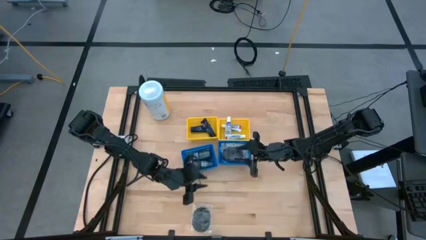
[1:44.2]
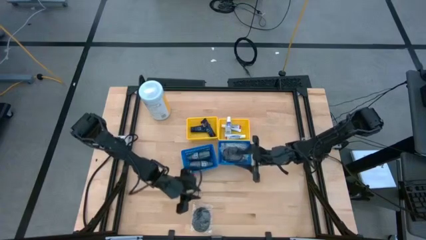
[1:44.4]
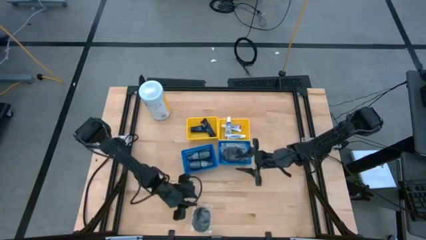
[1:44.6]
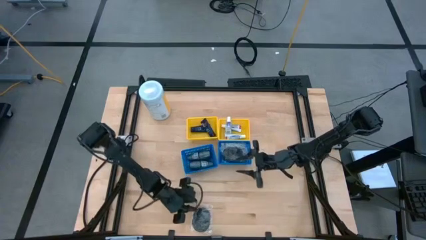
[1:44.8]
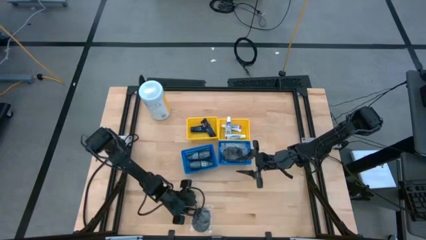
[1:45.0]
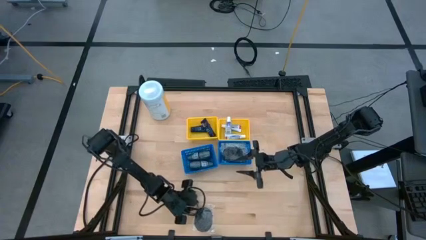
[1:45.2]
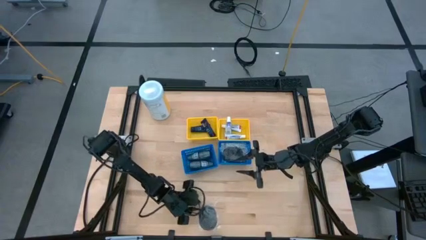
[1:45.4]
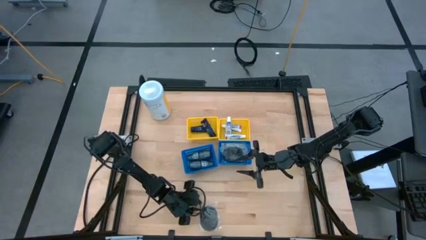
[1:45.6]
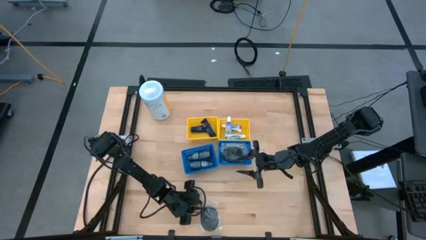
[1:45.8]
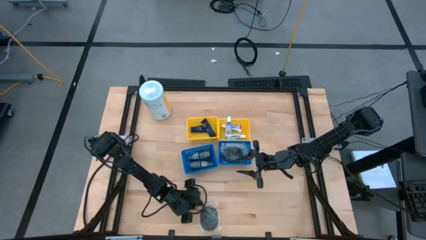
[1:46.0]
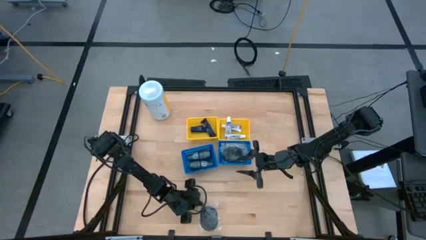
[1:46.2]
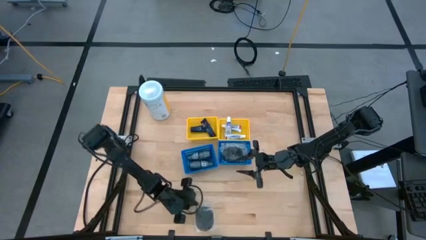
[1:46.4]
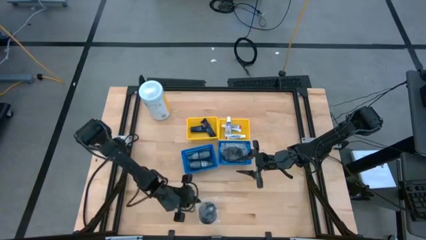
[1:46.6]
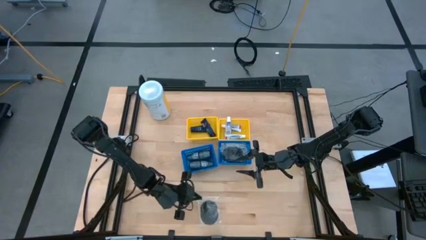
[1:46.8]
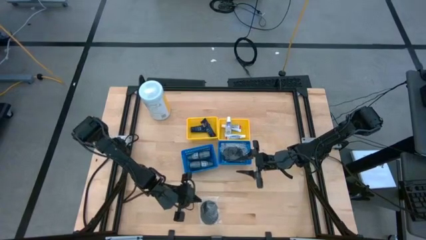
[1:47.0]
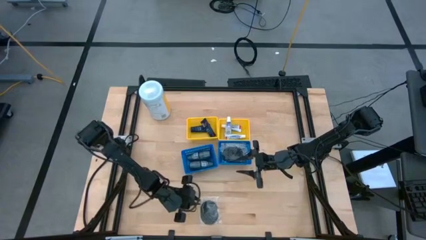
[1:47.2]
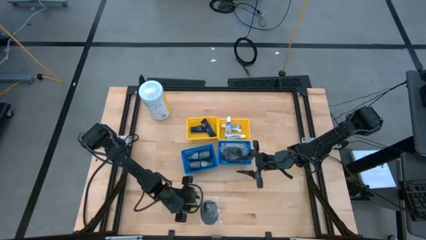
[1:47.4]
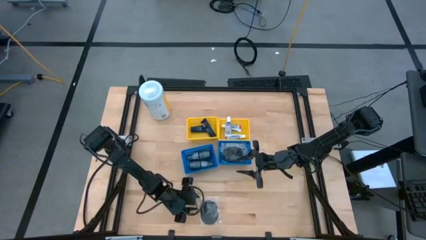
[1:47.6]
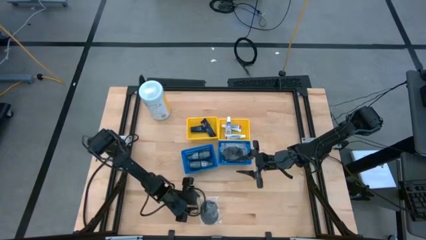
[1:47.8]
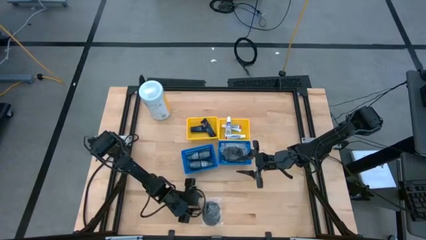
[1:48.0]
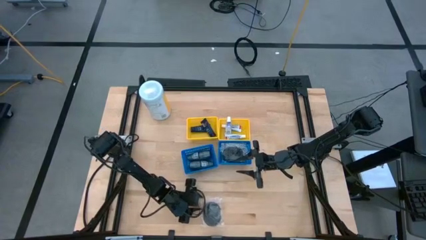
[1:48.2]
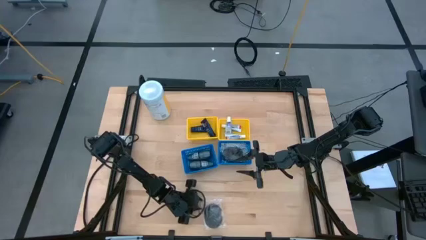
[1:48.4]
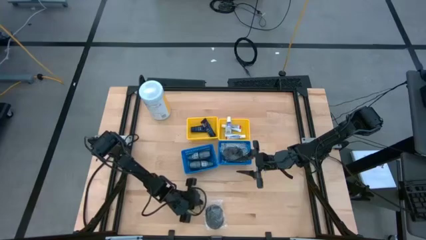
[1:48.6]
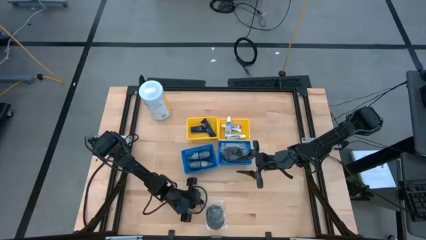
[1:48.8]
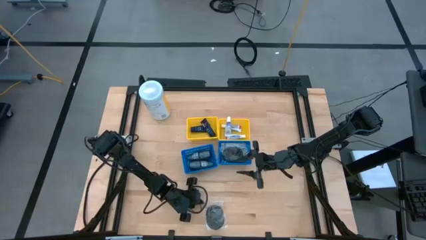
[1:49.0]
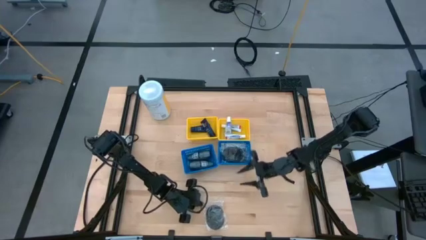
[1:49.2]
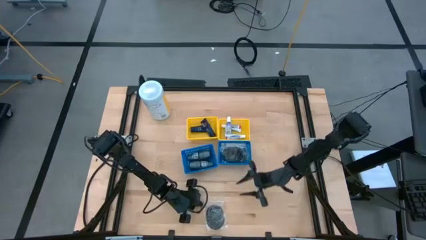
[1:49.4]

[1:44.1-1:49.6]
Task: Pick & Place Travel size toiletries
Put the hairbrush into the right blue bin

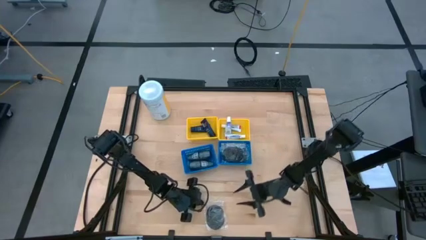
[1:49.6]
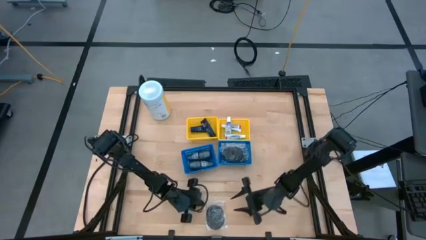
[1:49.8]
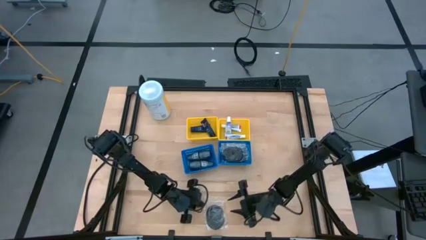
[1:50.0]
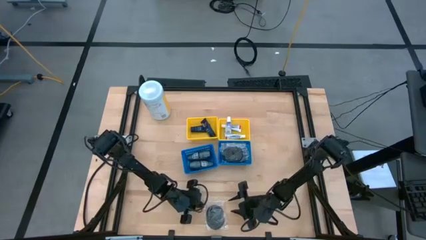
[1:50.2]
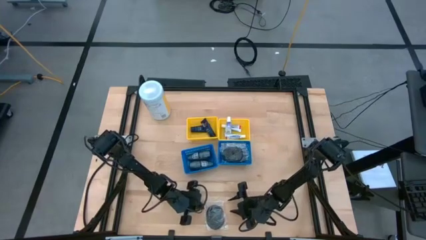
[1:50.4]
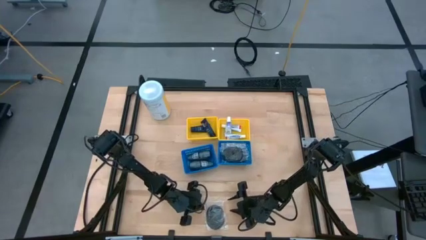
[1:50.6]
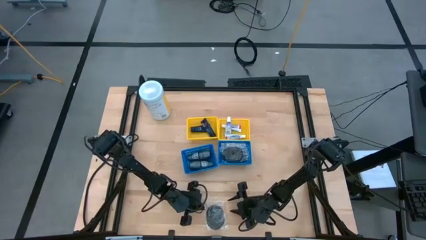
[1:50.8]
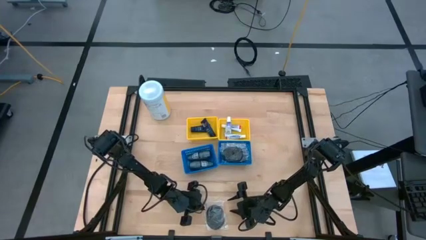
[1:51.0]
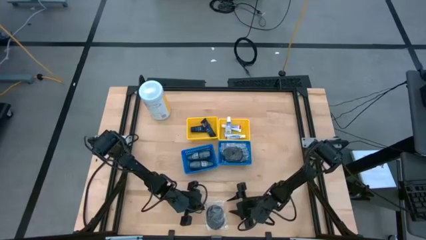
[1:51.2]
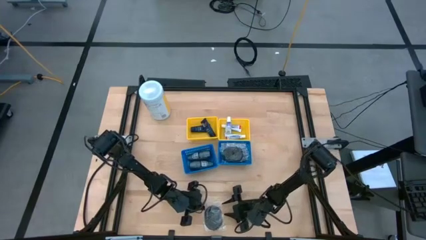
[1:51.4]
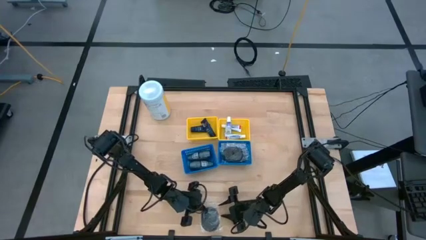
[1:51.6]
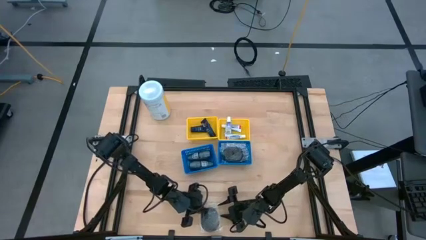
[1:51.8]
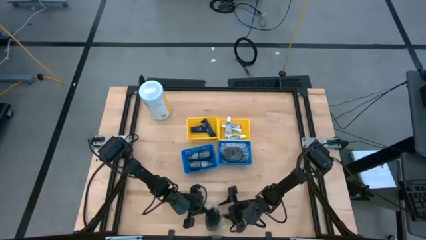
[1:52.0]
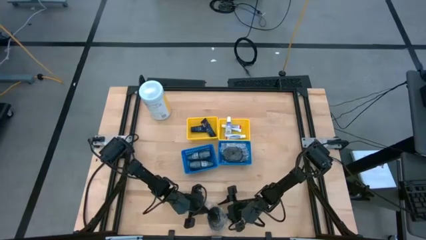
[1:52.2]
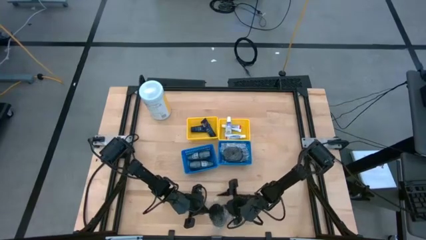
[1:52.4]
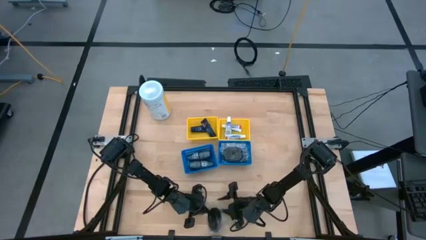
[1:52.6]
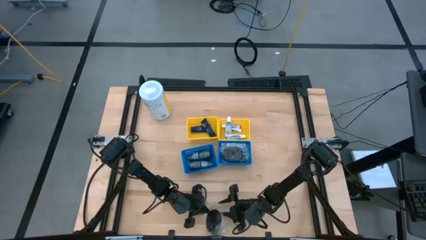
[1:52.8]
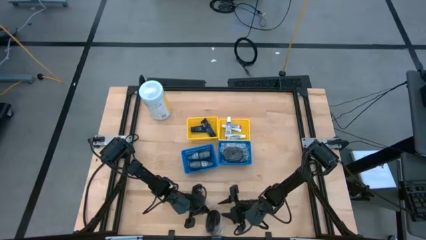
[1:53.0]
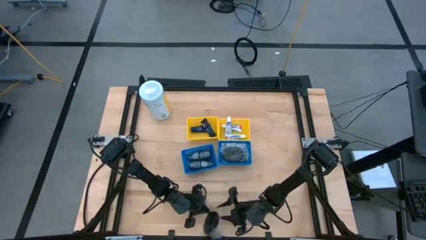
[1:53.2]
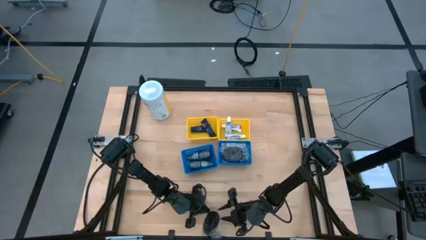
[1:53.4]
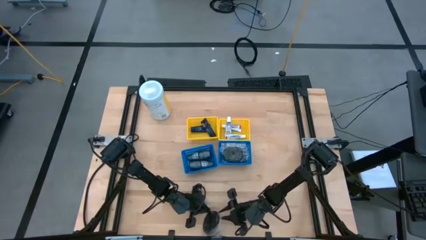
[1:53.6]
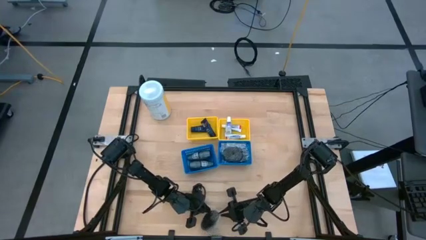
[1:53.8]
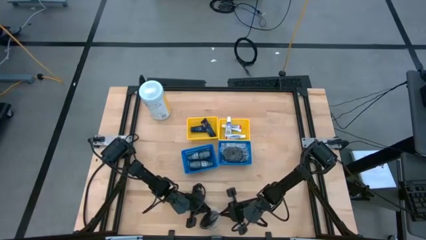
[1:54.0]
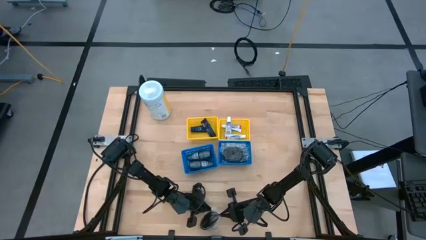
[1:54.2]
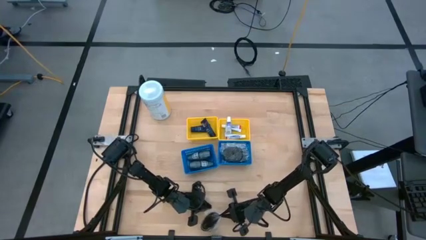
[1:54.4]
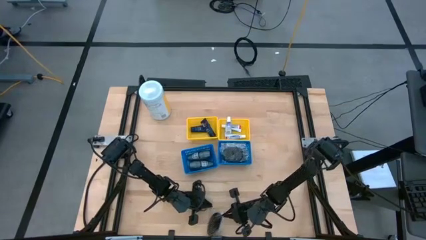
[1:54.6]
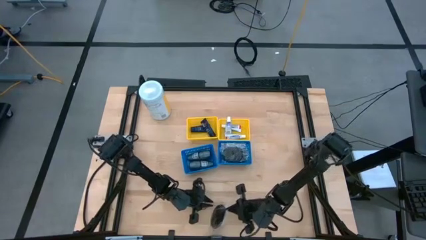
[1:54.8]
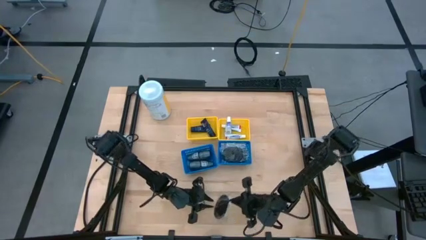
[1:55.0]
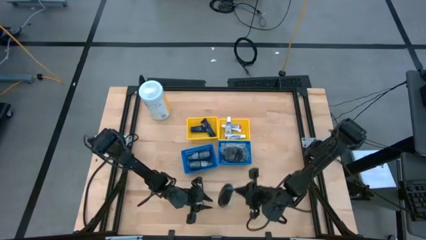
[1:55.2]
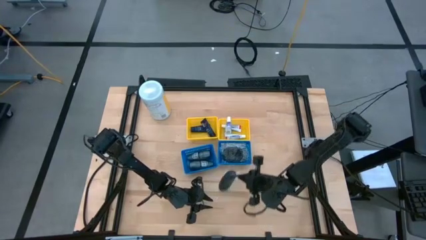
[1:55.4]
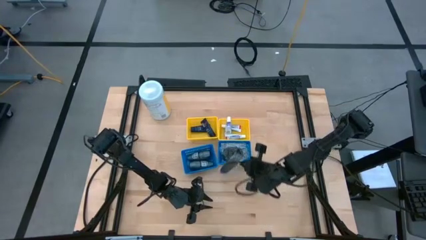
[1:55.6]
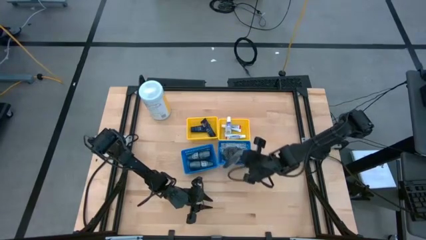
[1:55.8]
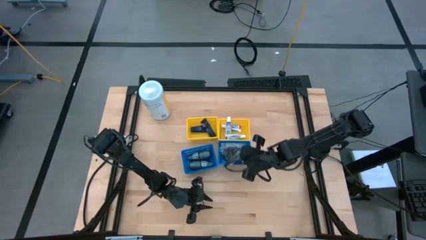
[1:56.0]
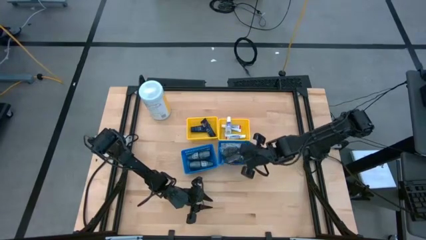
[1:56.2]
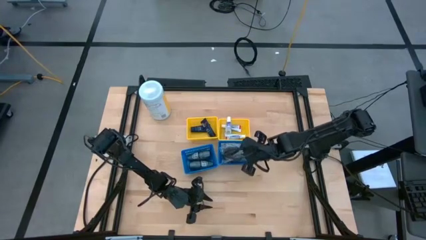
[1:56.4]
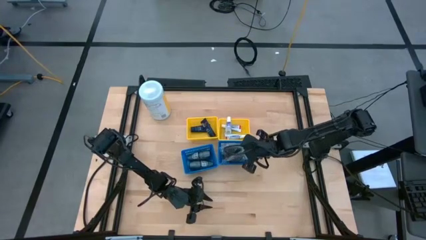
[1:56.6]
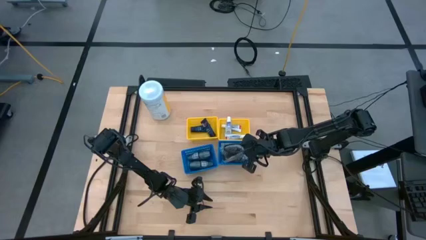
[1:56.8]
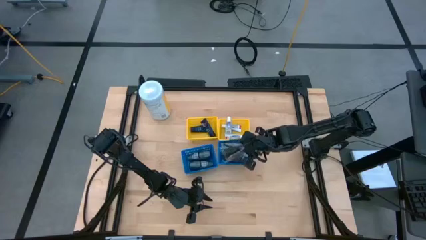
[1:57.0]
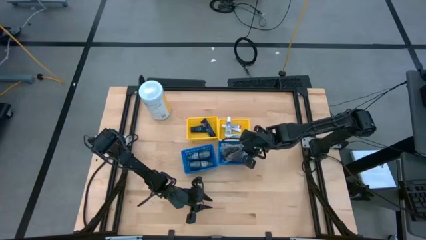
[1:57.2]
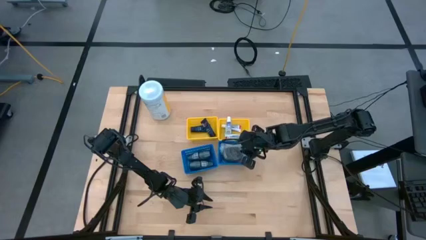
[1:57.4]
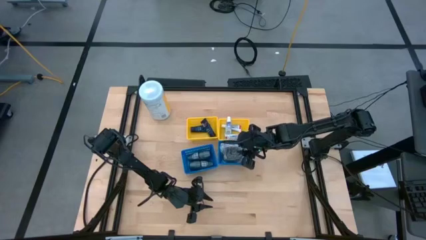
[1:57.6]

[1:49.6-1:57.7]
Put the hairbrush into the right blue bin

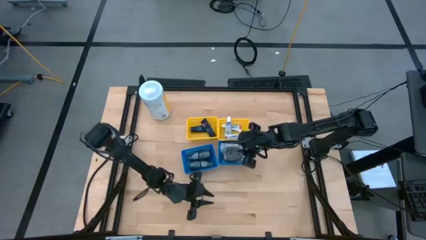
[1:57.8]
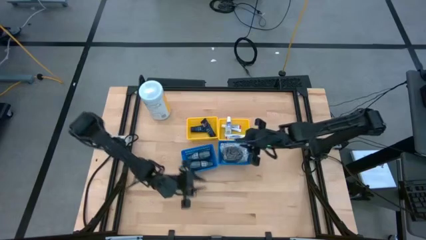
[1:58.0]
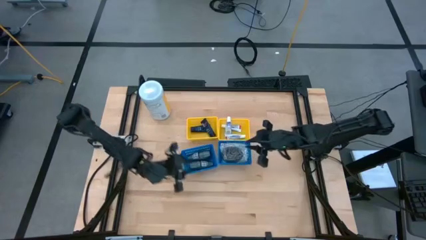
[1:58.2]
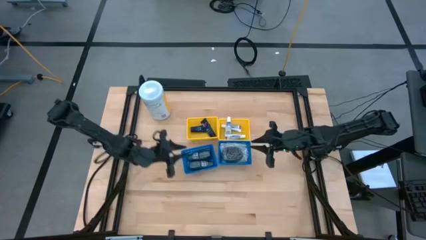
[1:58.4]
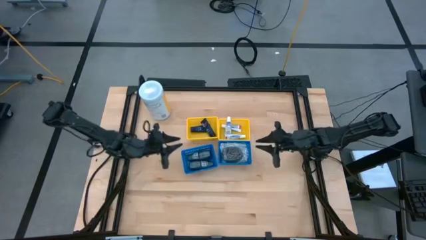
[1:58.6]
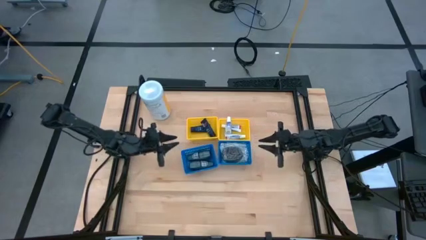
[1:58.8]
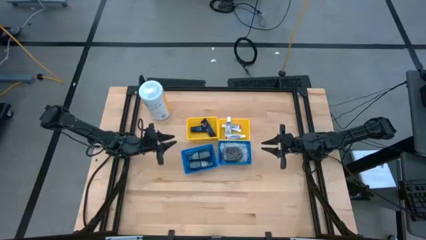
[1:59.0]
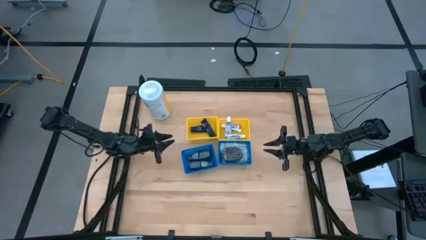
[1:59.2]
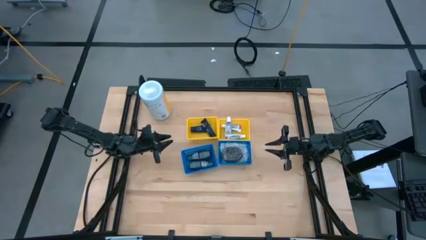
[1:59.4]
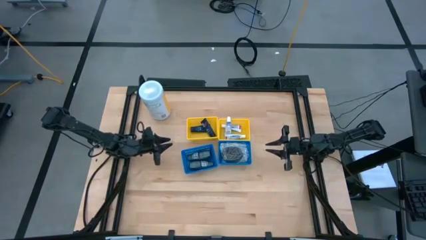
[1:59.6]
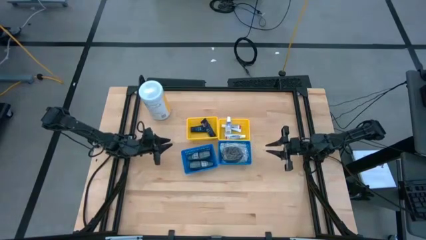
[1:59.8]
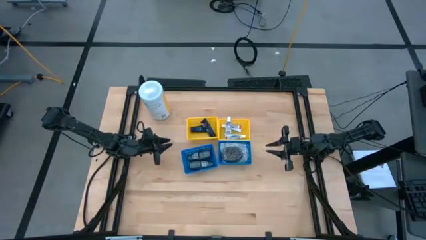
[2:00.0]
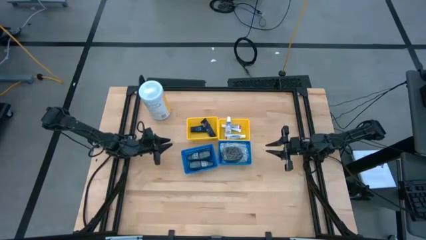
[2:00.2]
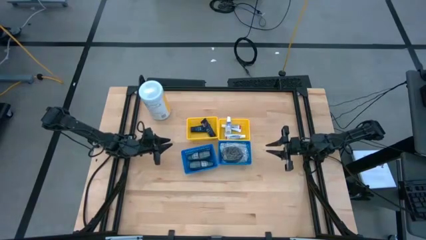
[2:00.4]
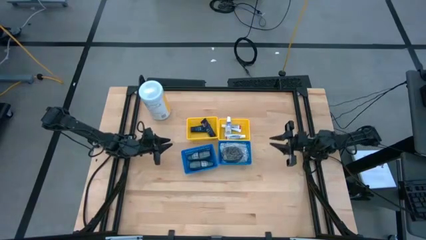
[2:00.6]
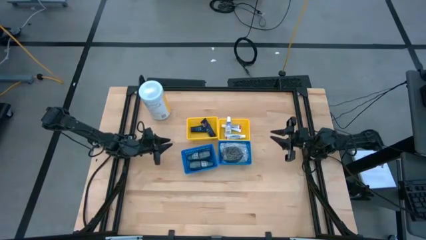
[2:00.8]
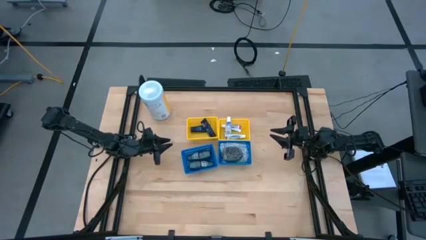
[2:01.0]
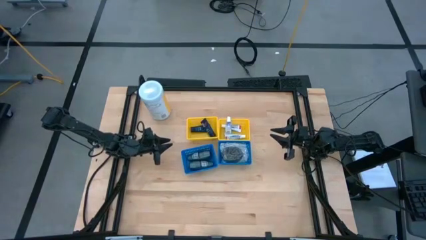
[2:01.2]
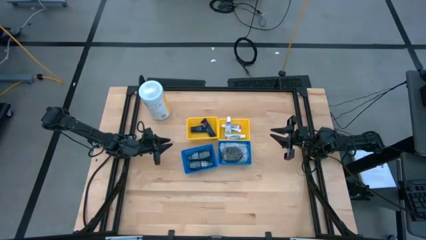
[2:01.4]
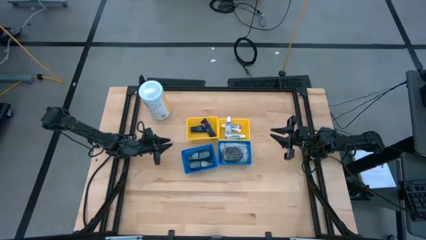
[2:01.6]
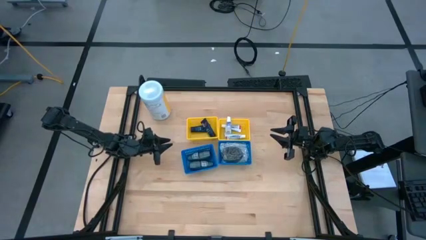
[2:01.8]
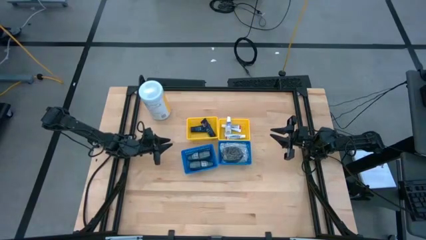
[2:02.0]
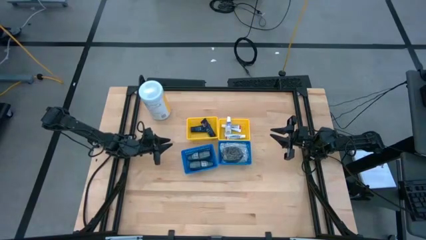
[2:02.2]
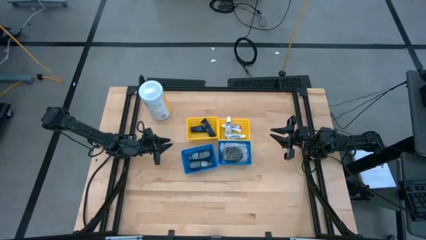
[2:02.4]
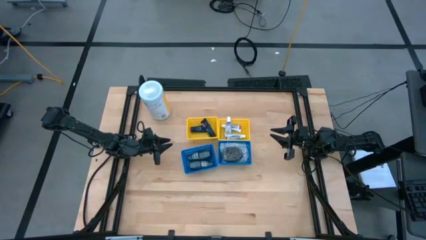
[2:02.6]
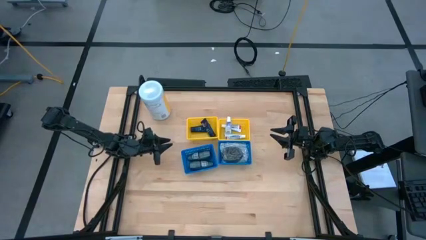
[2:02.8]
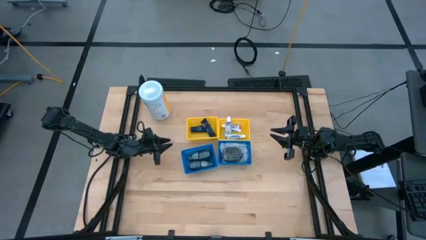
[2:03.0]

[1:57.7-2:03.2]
Return to Home Position
